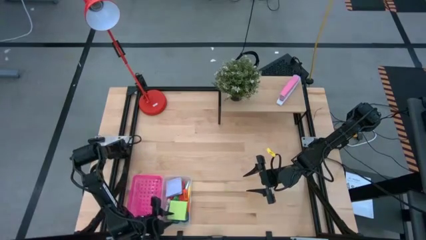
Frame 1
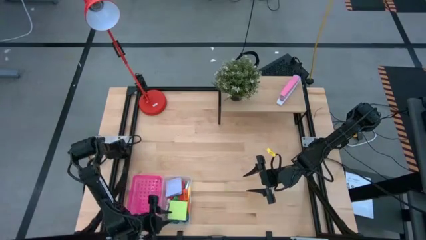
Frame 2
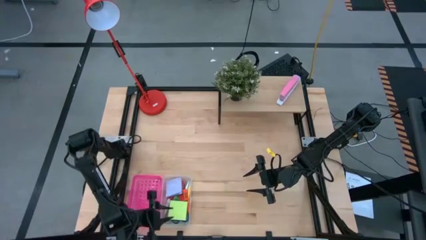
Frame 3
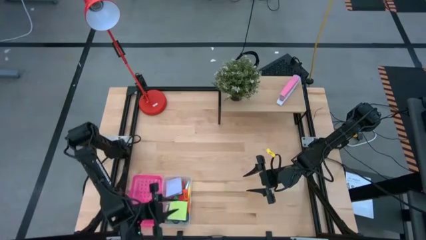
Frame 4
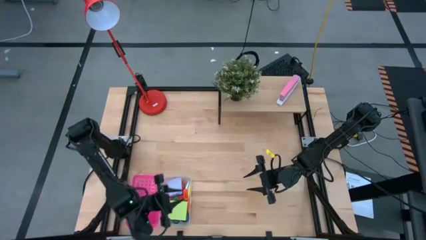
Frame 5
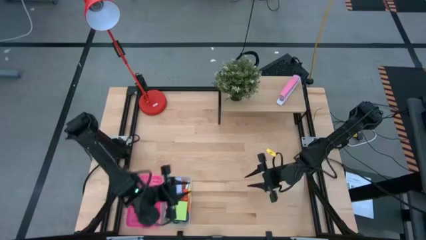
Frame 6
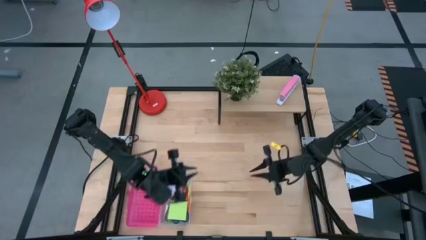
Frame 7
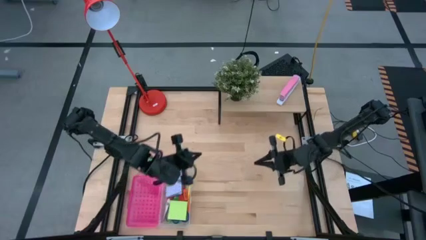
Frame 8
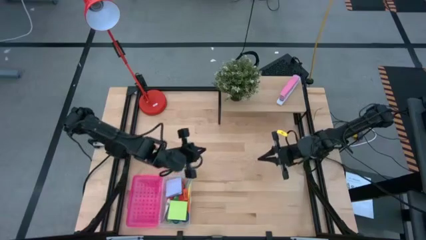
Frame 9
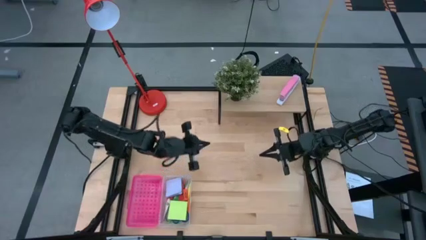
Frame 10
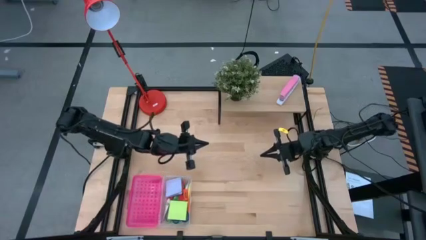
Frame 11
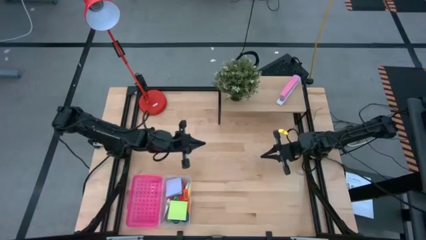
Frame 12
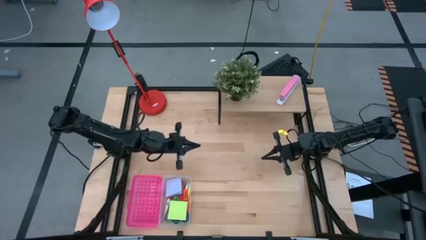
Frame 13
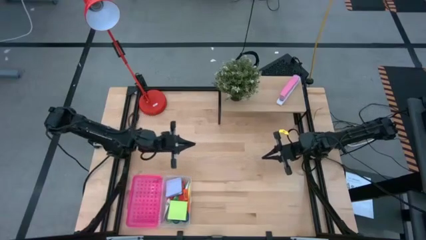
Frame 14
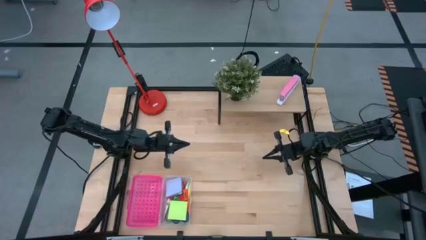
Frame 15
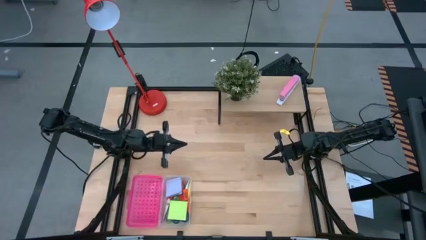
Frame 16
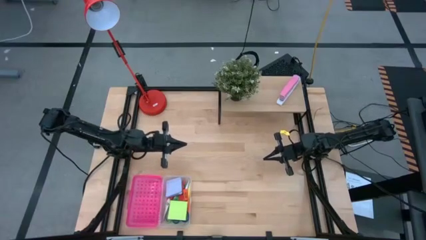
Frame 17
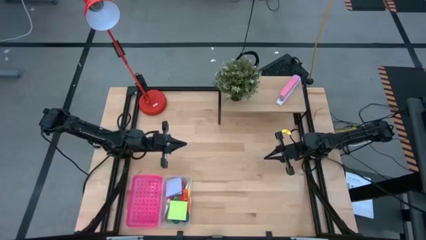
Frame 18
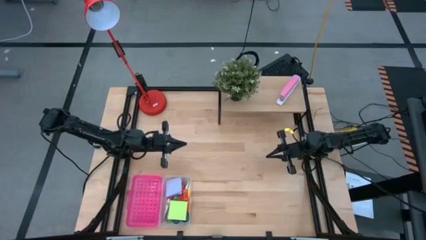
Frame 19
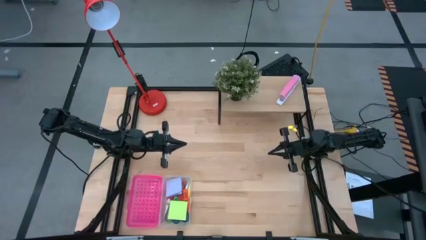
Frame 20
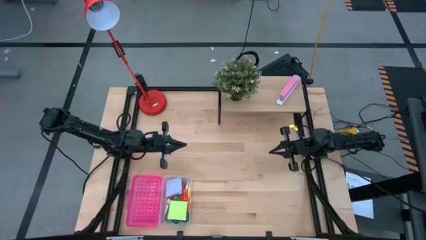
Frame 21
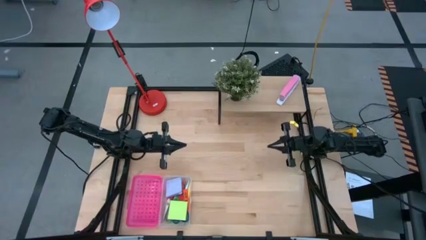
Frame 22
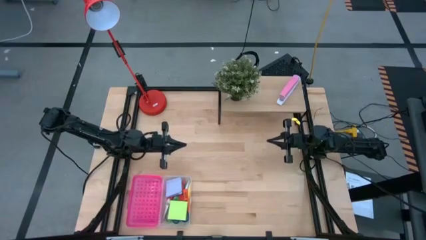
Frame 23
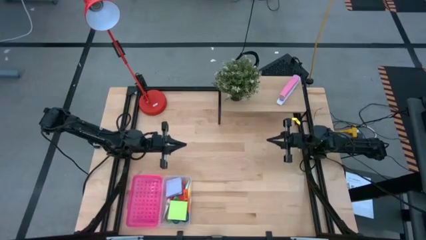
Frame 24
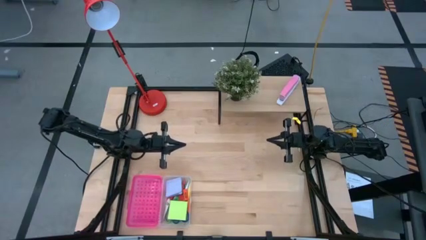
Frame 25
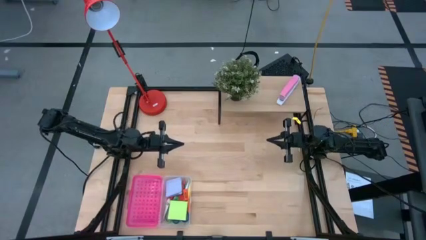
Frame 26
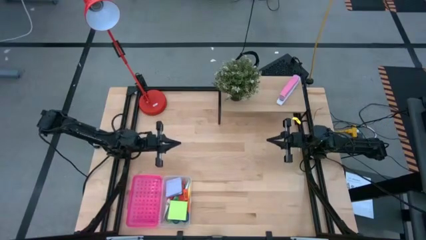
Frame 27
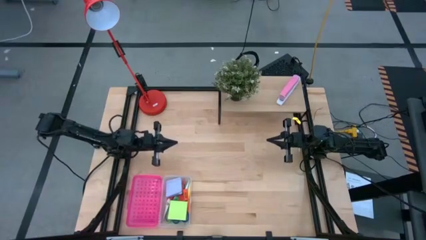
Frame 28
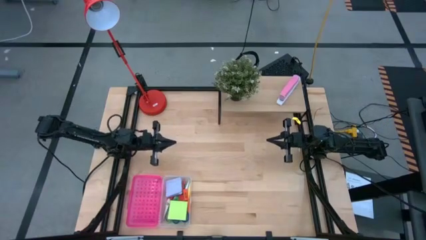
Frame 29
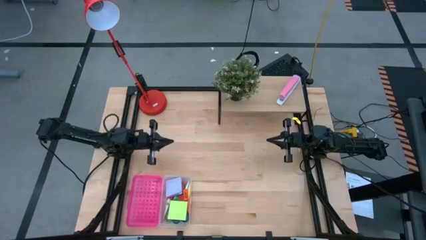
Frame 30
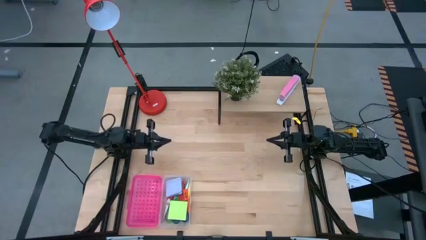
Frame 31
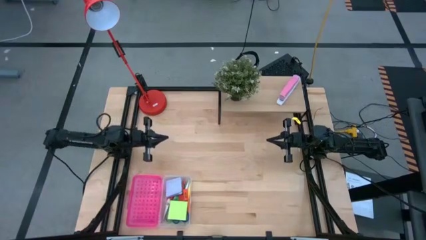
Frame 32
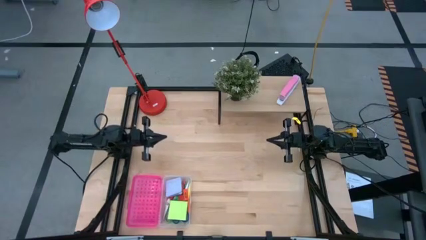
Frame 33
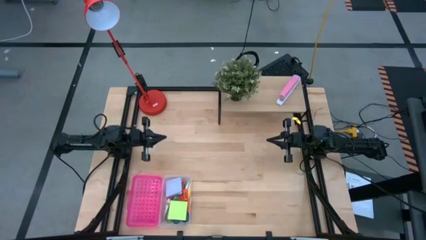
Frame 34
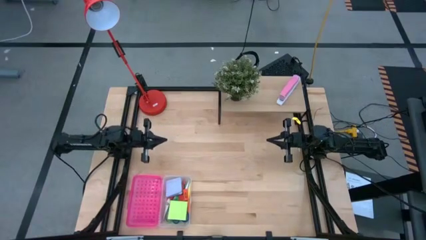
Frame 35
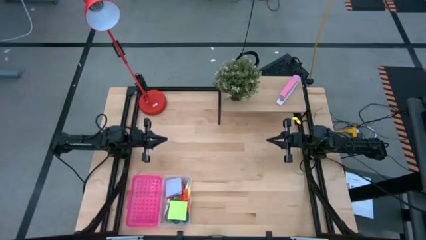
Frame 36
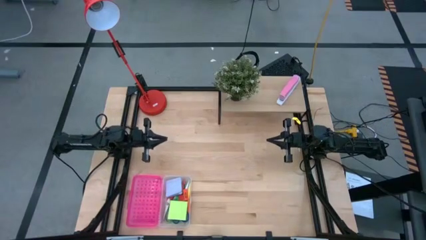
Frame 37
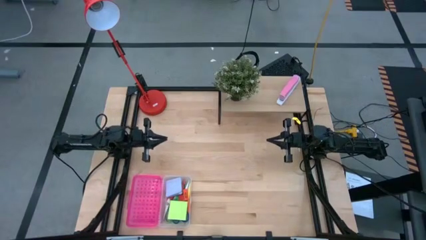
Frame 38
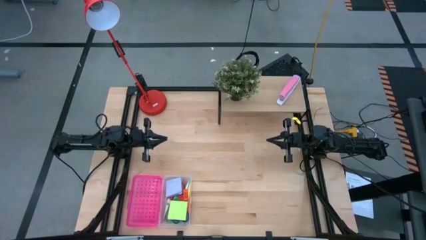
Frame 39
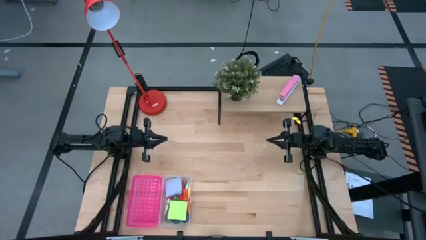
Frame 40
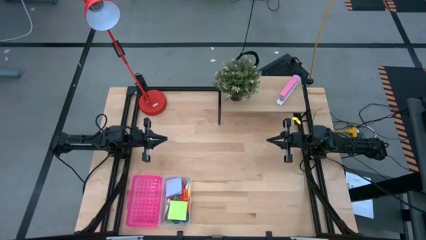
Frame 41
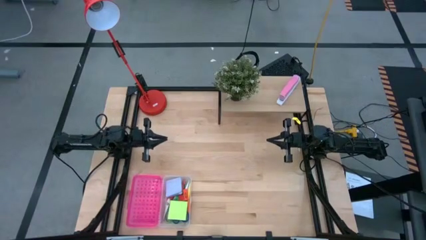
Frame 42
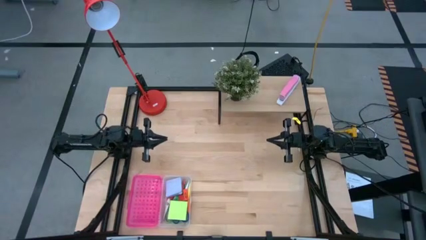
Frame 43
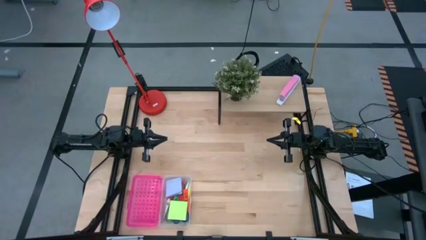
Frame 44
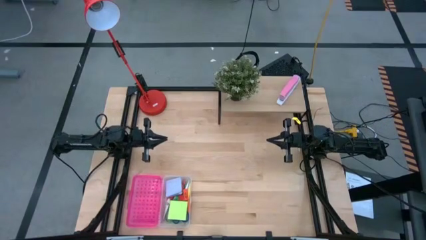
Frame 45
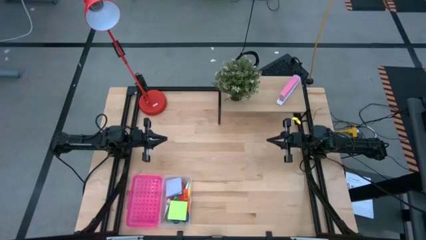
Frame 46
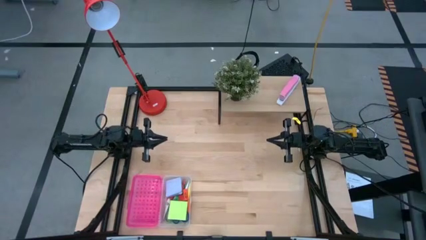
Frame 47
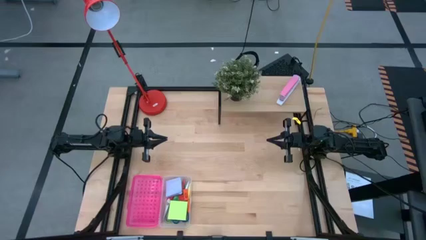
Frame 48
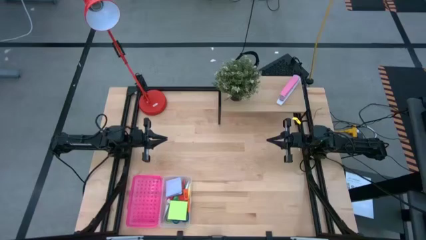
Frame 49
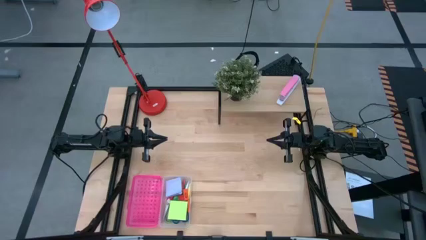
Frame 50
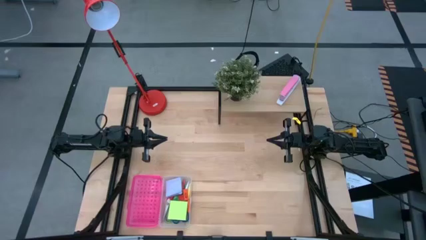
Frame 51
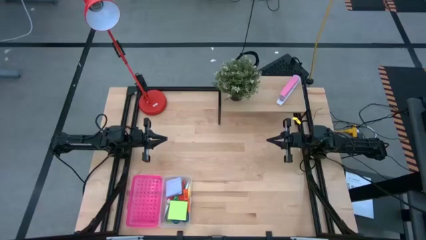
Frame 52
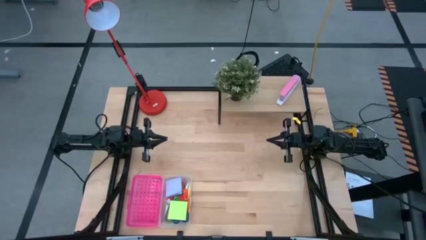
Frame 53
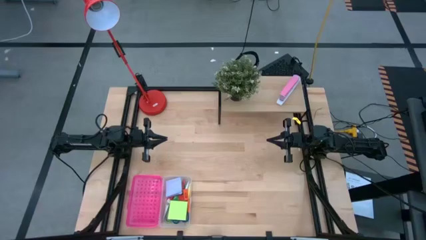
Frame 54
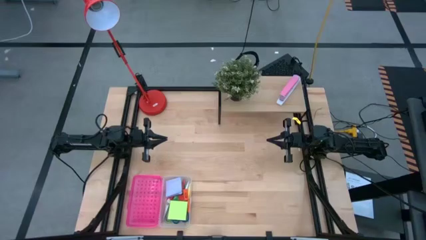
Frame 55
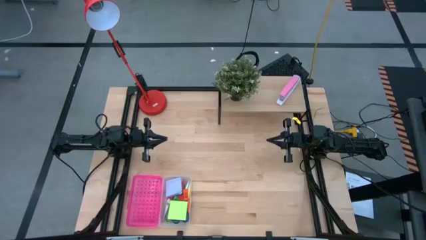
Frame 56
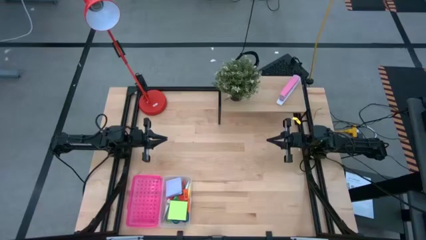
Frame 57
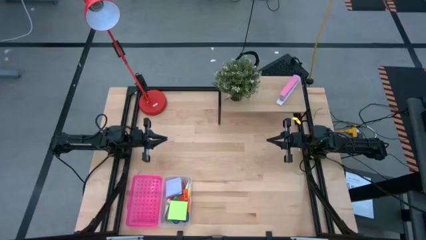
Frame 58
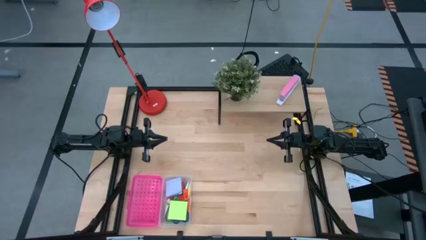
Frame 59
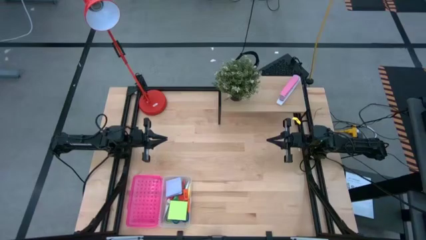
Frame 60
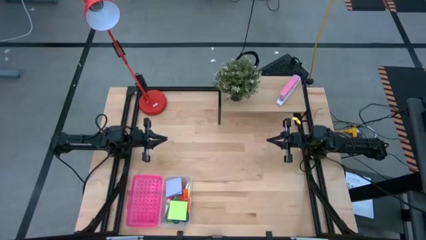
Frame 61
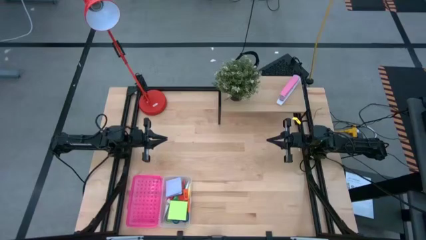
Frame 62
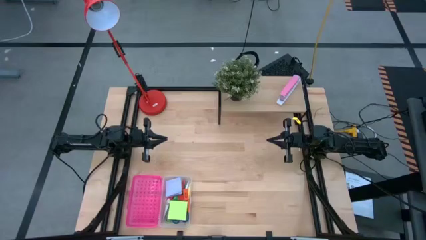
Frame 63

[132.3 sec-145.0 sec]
Task: Pack school essentials
Return to Home Position

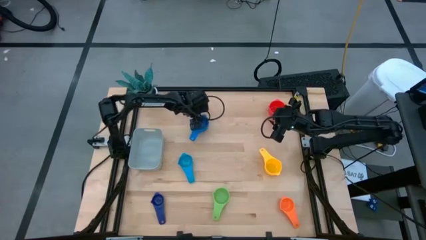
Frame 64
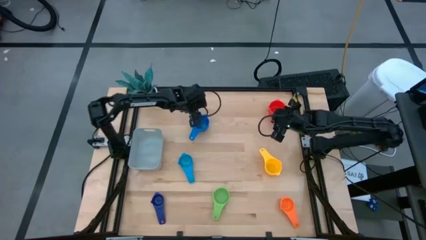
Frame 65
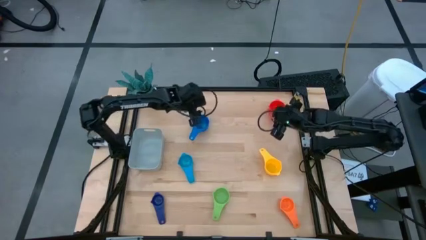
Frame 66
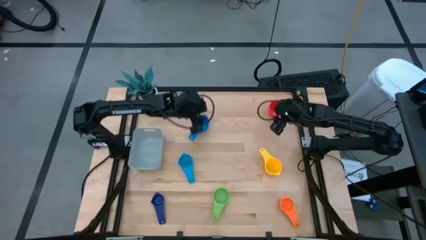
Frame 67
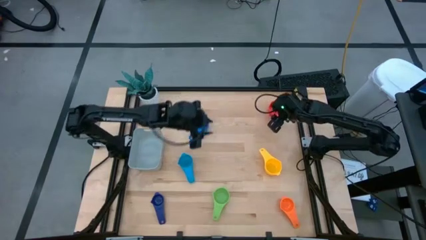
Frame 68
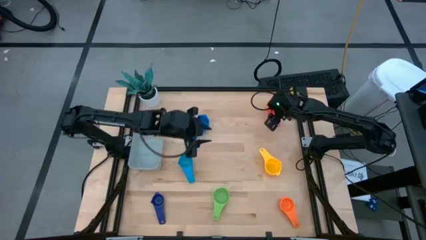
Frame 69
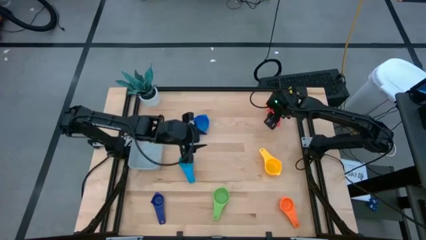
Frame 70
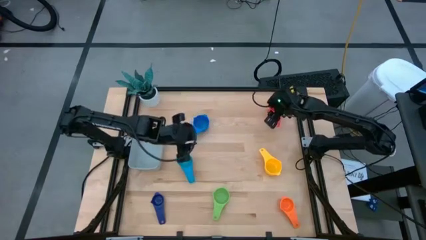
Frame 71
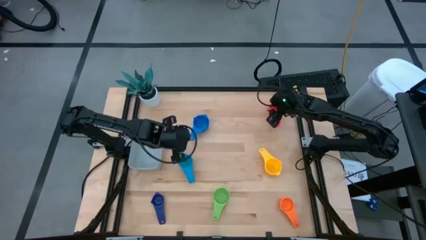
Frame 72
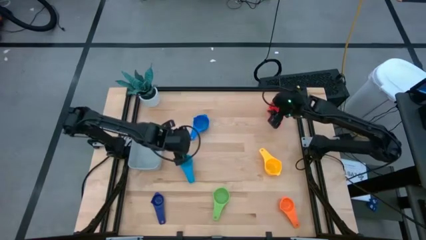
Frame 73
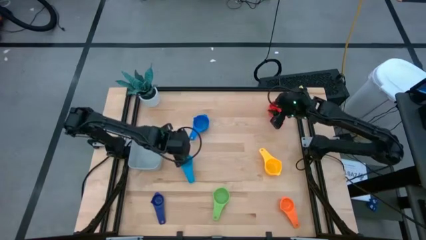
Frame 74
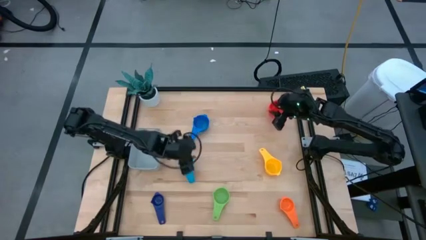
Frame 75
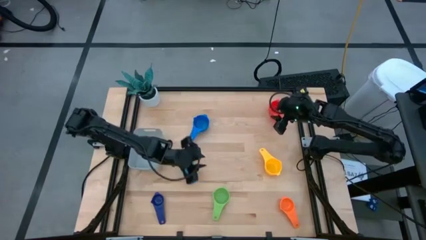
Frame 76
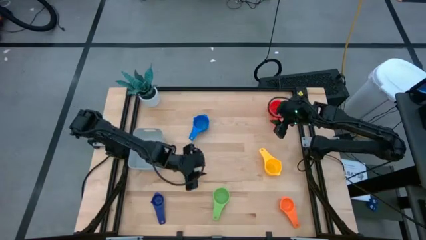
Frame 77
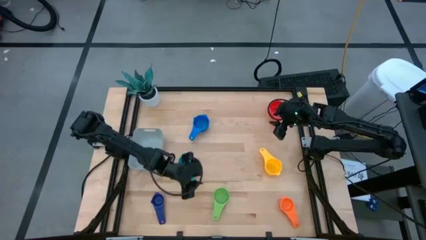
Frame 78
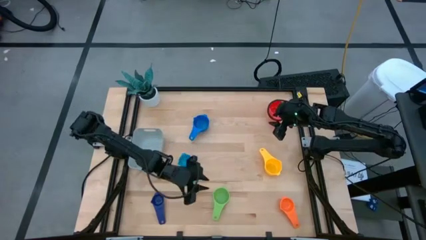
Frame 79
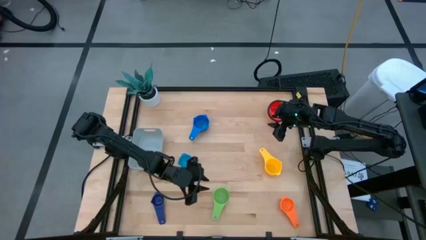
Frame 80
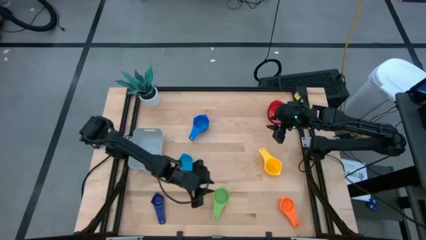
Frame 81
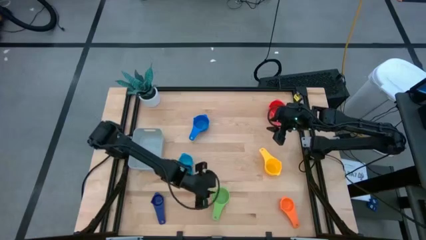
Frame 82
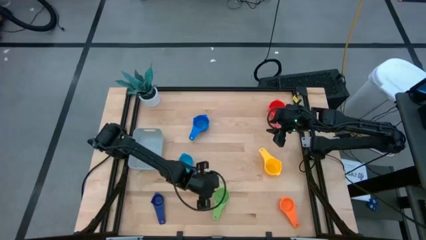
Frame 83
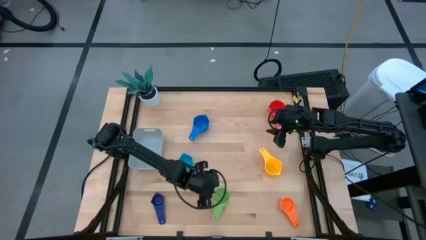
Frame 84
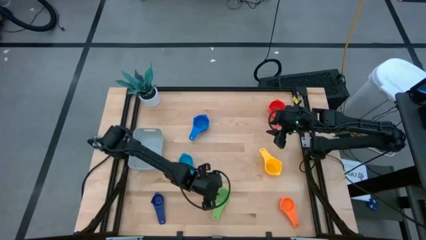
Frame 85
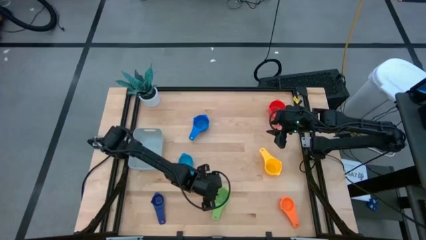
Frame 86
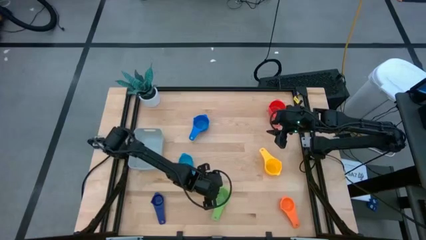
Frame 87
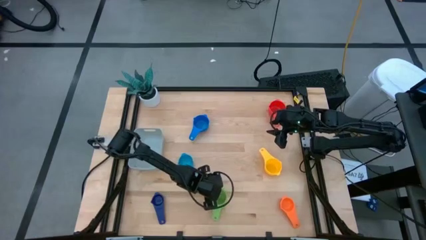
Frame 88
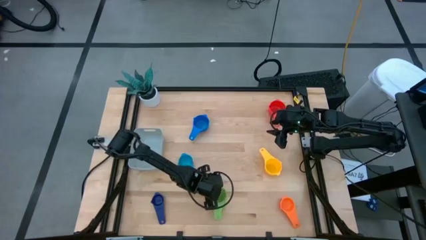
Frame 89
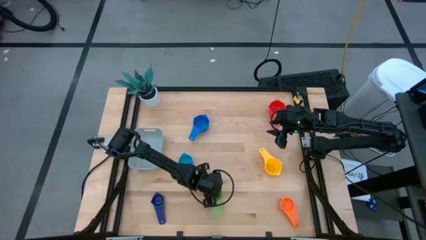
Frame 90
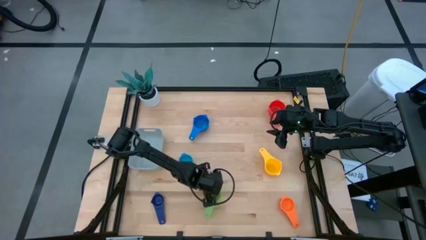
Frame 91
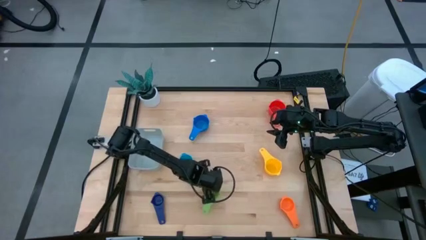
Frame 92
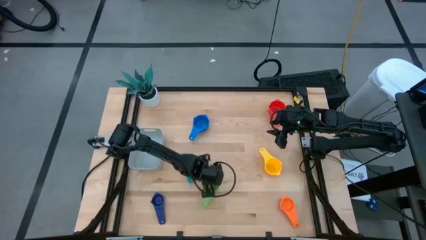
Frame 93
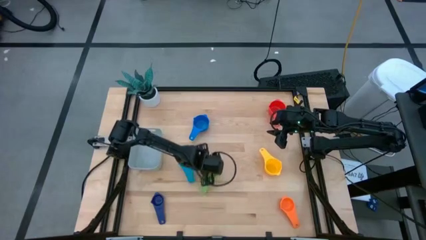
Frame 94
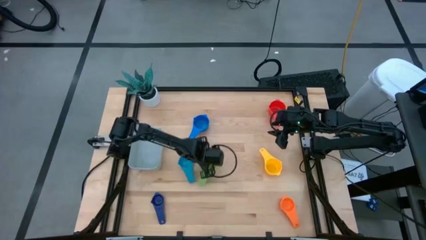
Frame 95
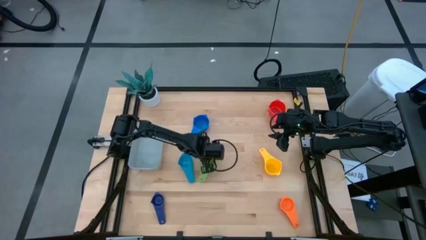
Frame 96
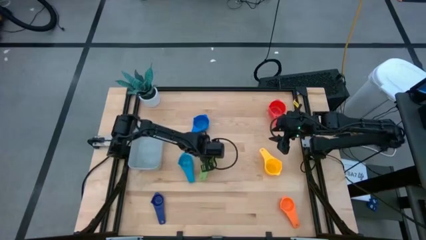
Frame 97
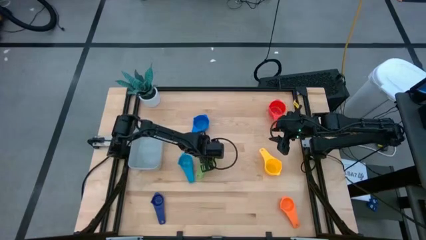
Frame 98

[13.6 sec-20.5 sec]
Task: Nest measuring cups in basket
Move the green measuring cup to the centre of the table
